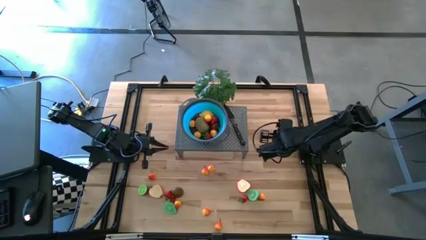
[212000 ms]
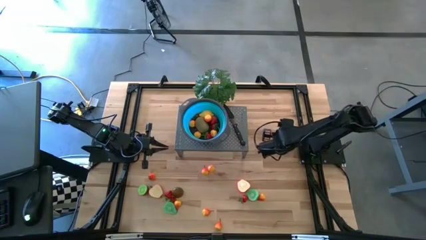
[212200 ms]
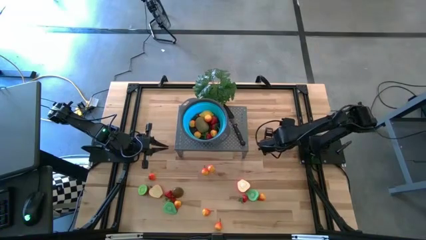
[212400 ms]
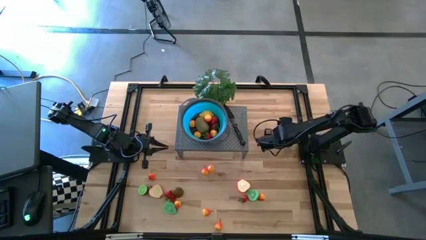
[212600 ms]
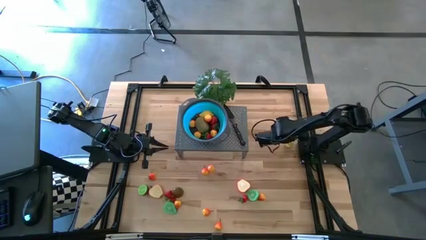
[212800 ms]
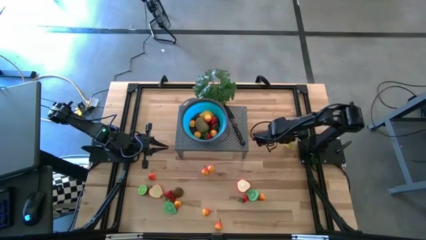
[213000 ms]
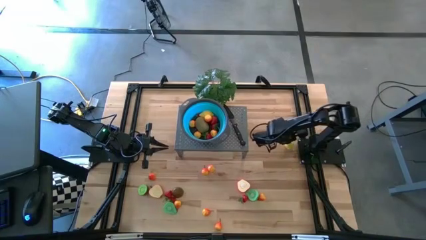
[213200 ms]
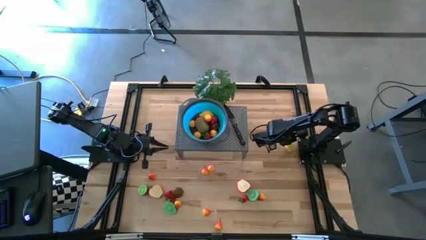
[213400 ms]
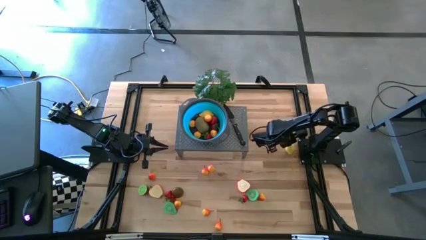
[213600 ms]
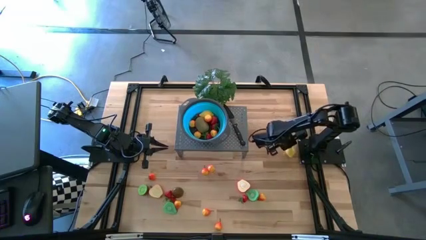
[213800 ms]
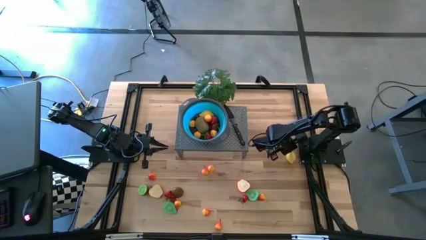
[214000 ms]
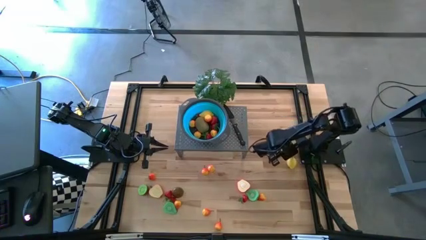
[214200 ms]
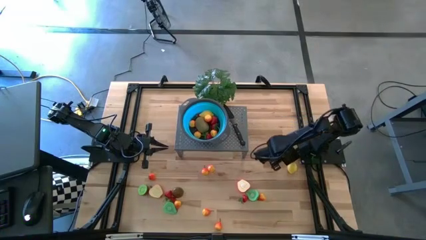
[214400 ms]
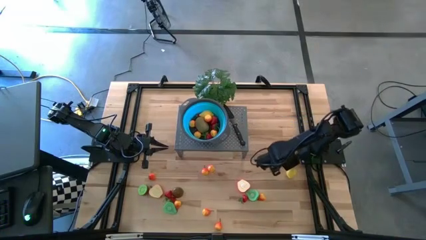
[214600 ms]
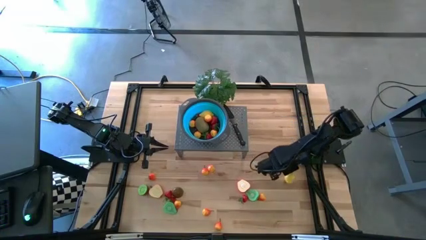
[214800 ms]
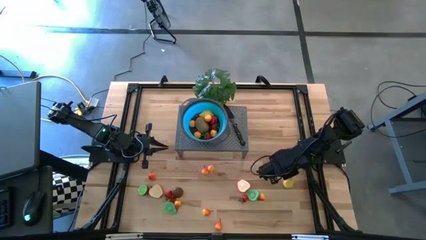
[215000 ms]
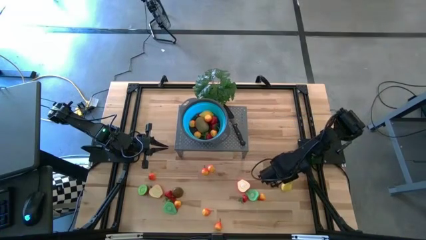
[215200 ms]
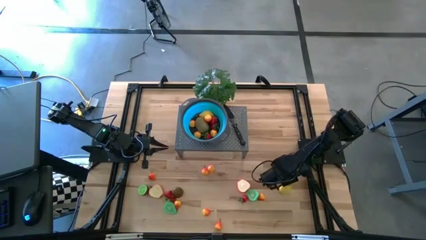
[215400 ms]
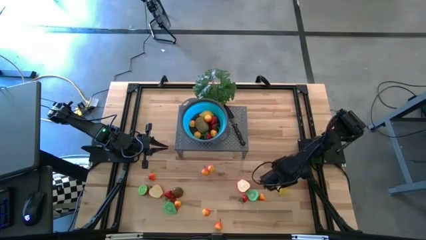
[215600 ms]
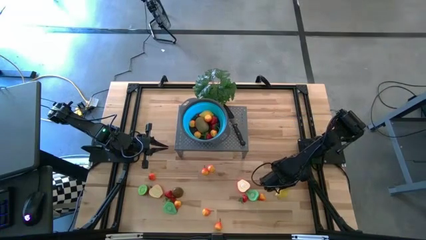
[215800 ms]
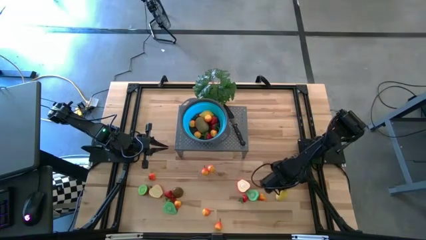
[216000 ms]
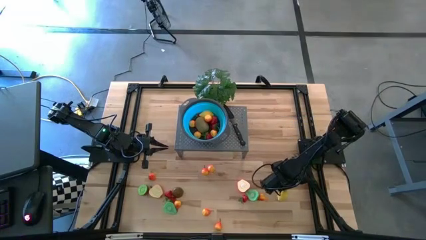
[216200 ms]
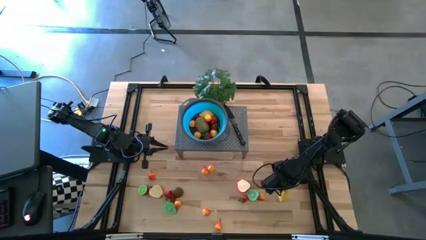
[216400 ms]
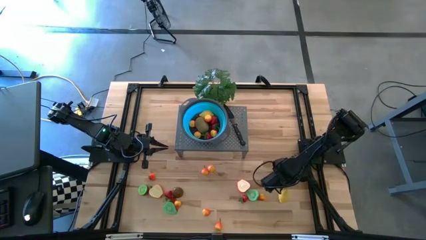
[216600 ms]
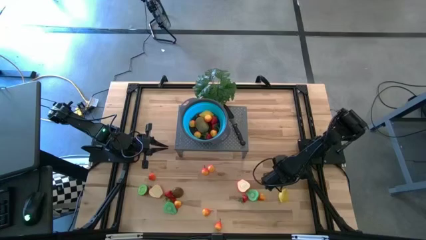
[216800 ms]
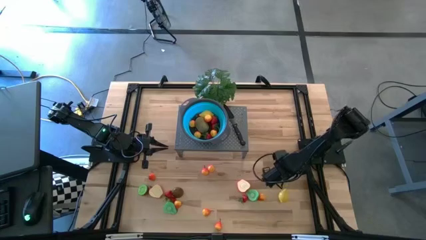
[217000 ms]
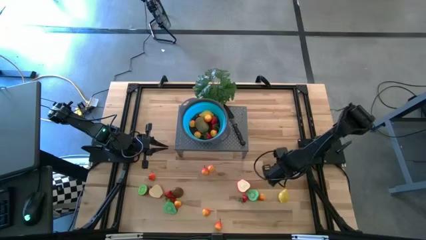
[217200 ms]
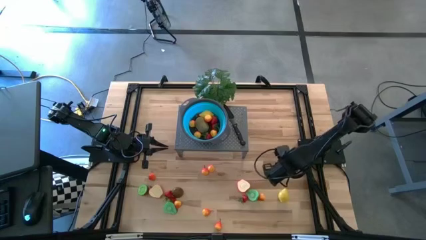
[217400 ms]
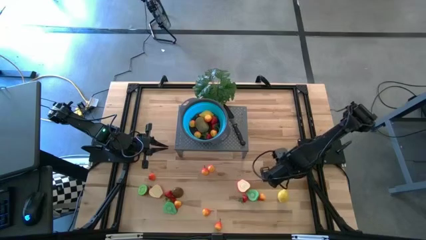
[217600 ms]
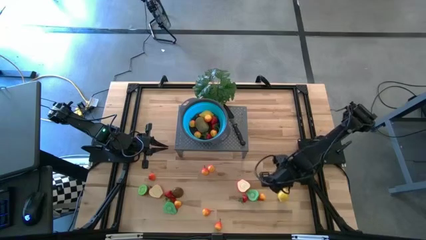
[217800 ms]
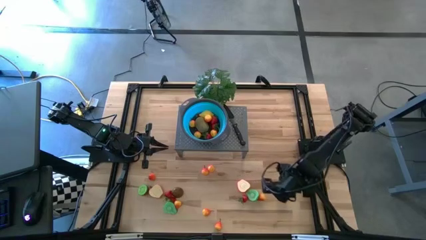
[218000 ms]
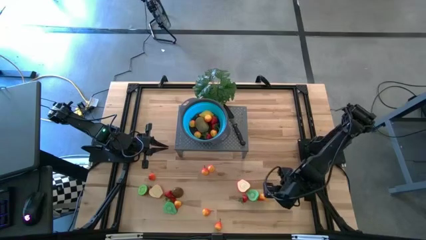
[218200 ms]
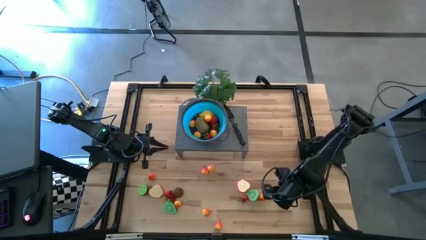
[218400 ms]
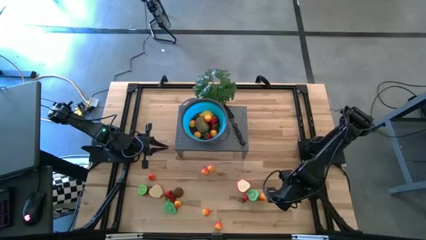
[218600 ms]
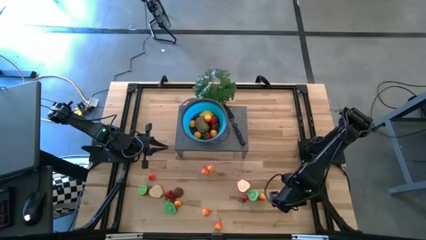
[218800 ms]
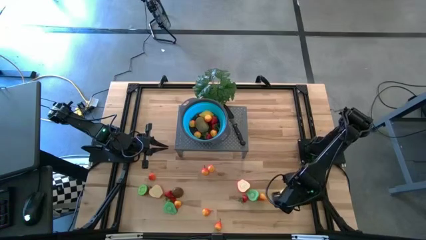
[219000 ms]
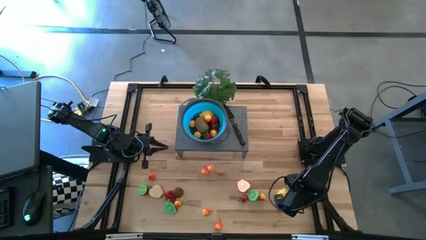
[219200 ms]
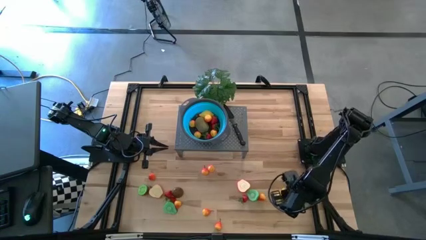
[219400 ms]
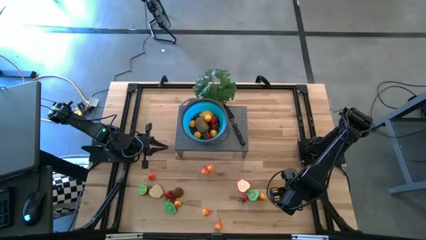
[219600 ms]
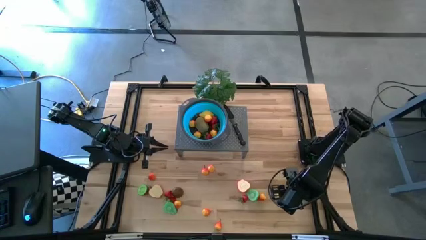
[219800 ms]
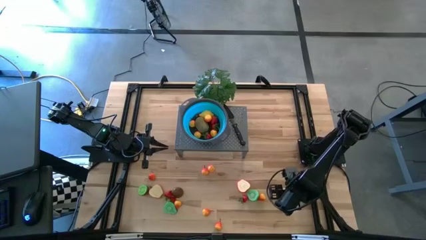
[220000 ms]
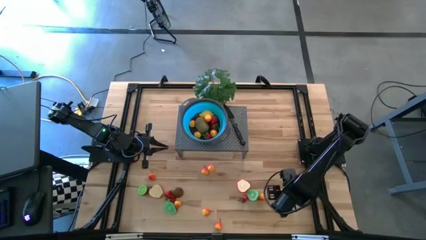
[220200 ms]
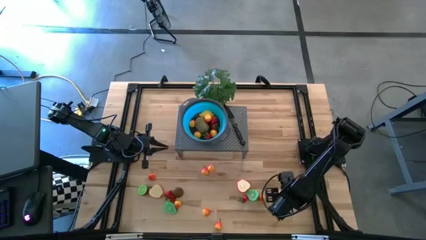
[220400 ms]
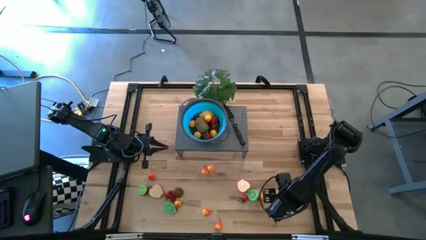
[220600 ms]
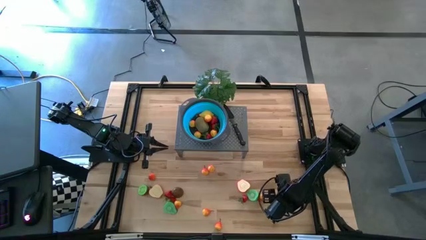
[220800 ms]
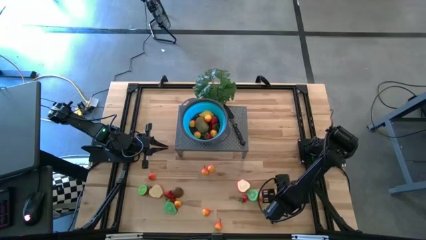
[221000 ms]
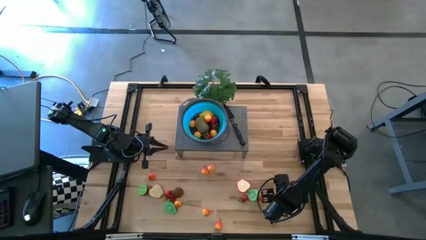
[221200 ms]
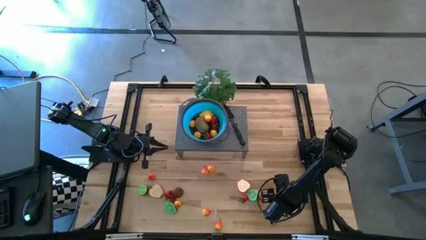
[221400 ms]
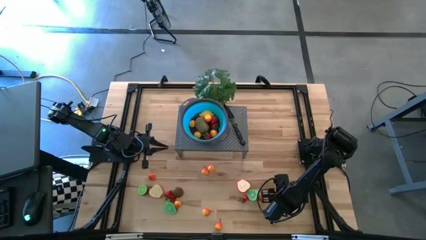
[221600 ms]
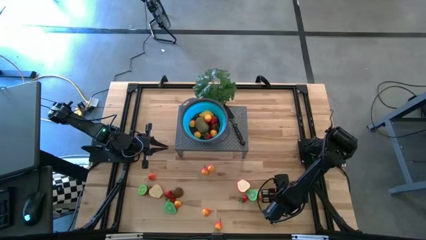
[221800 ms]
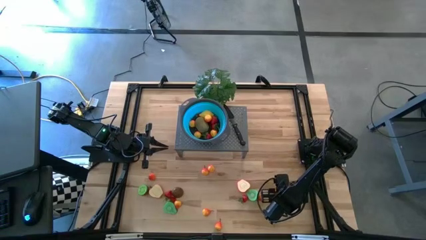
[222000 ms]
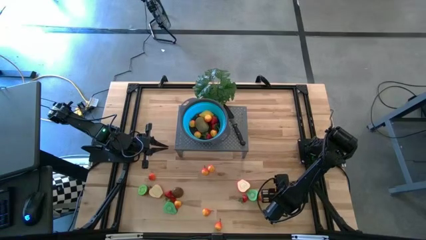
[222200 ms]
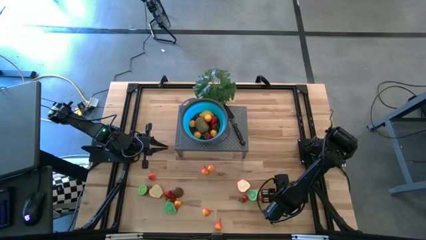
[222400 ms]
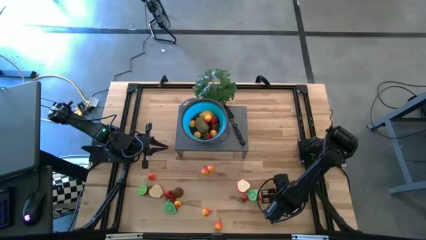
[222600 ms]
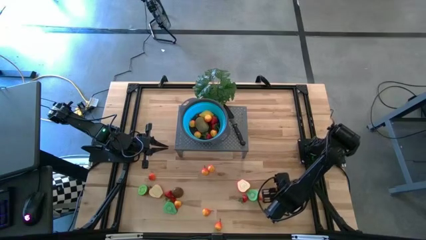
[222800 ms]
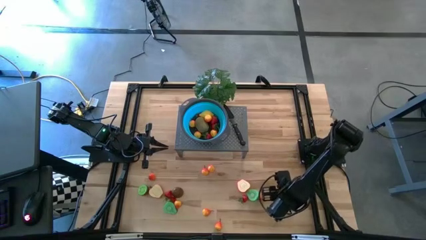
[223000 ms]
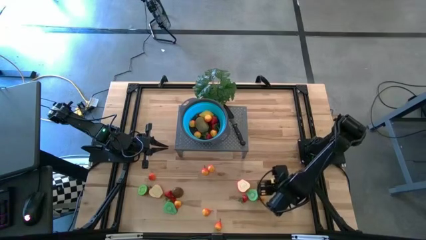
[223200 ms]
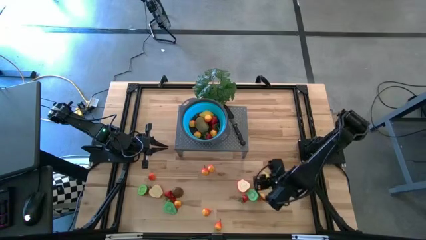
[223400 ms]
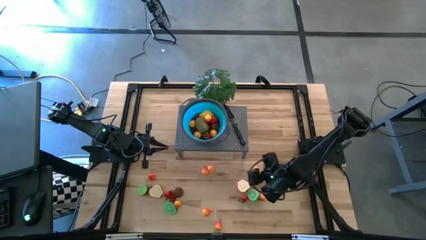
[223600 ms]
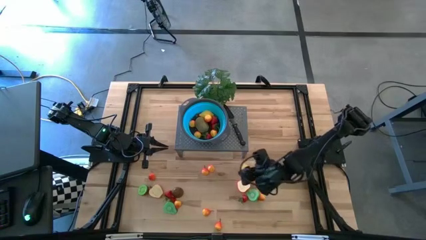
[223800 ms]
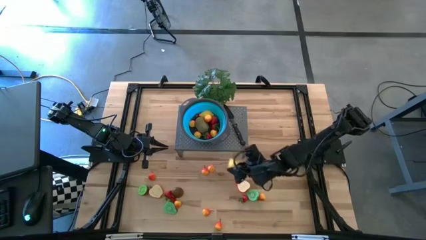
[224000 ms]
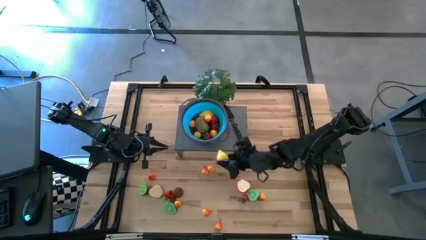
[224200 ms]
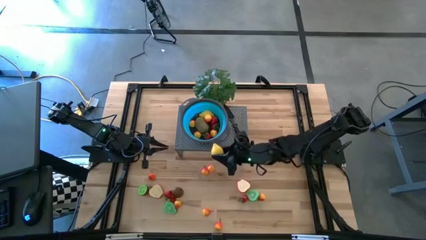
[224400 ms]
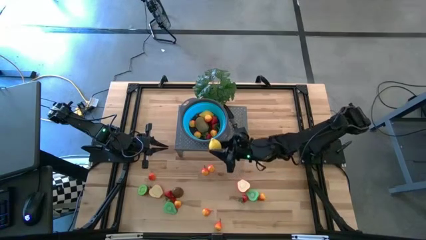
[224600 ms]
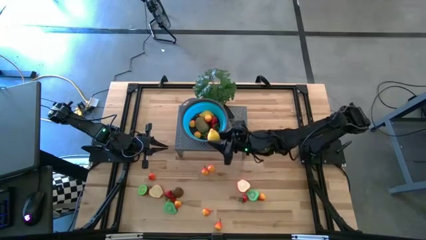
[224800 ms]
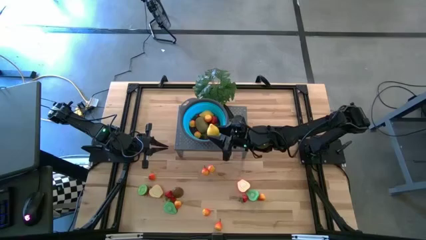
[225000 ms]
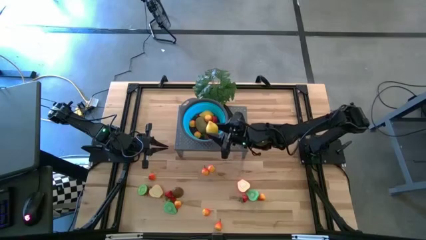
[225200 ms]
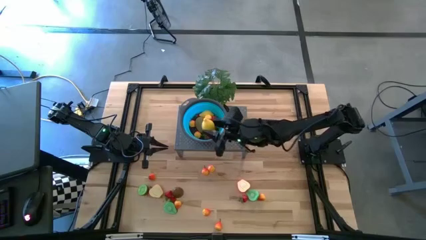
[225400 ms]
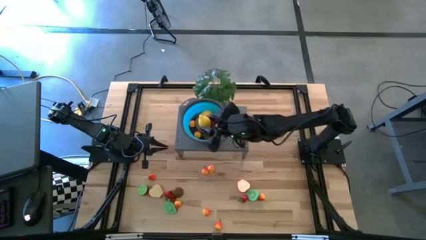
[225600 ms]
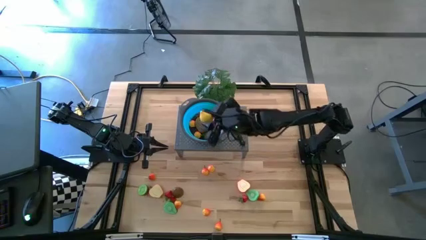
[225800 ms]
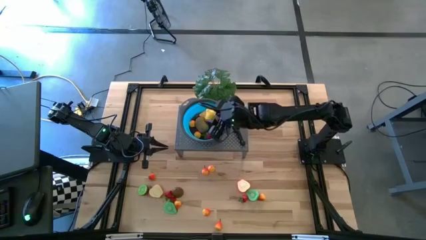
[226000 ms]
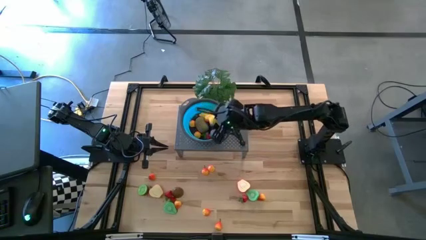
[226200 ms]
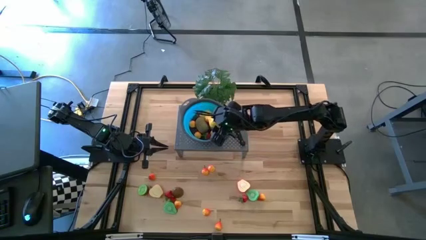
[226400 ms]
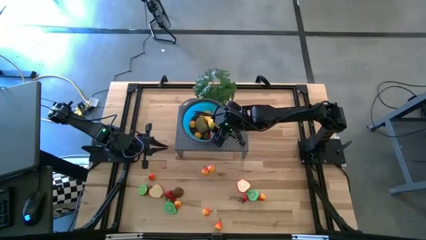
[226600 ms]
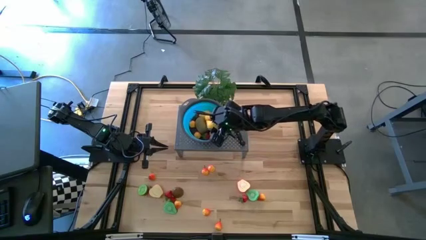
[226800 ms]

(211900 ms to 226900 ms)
Task: Pick & Place Fruit
Put the lemon into the blue strainer bowl on the shelf
